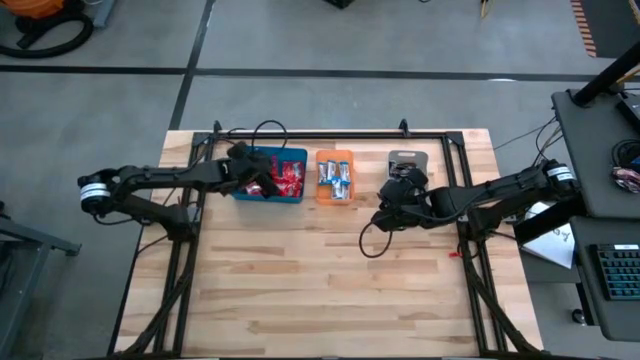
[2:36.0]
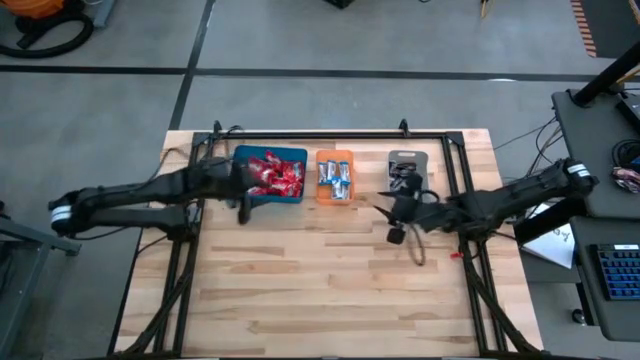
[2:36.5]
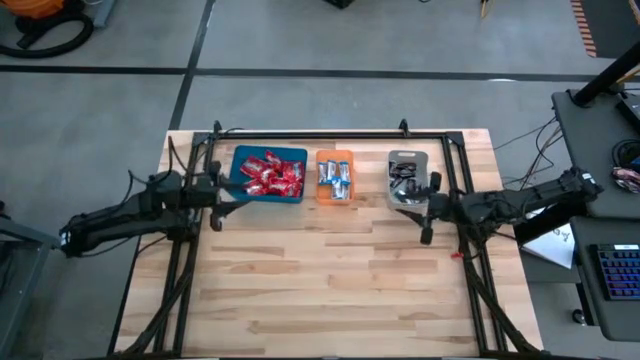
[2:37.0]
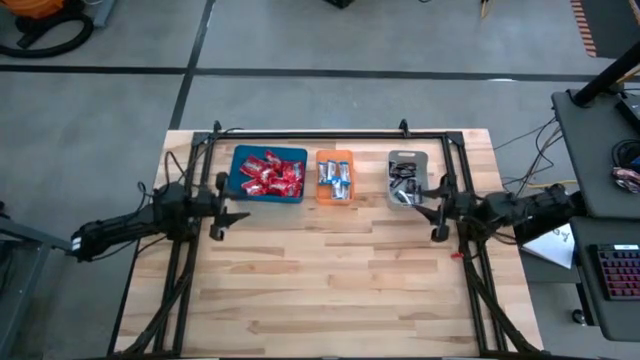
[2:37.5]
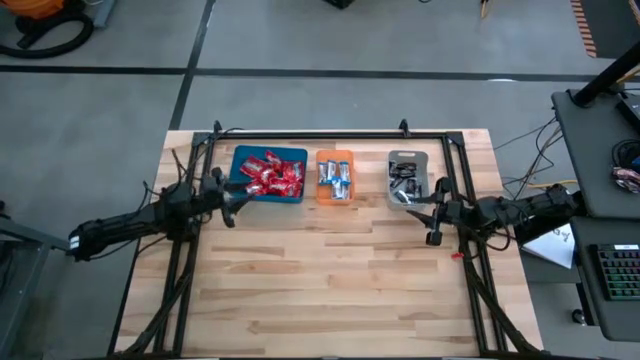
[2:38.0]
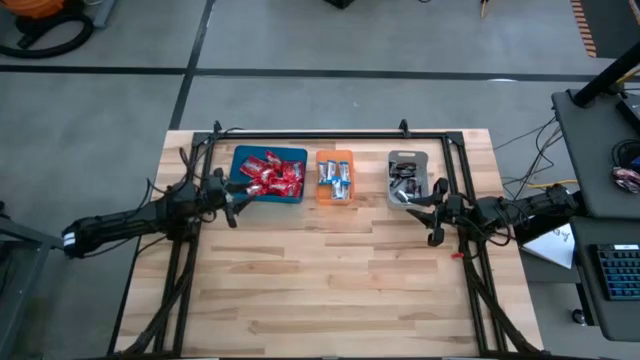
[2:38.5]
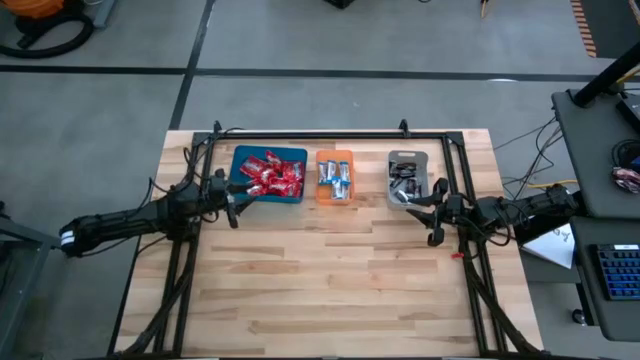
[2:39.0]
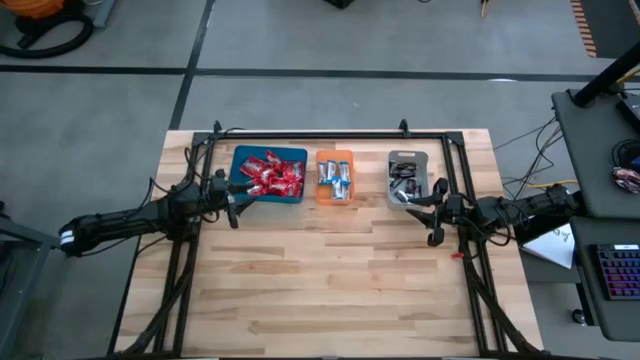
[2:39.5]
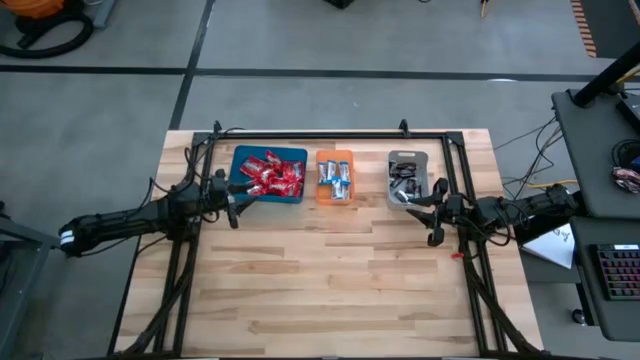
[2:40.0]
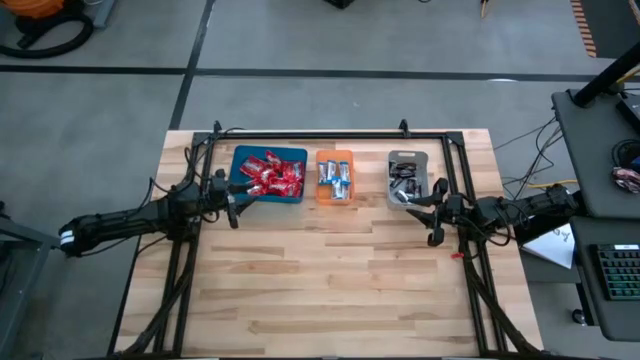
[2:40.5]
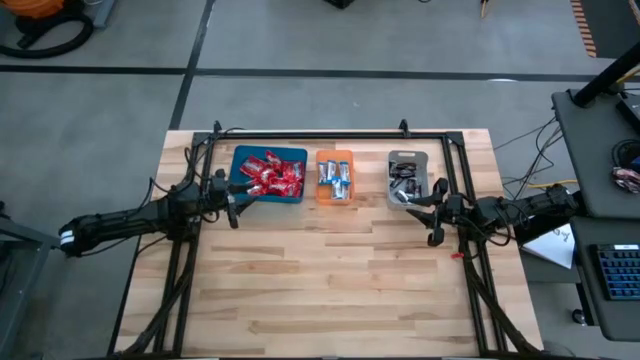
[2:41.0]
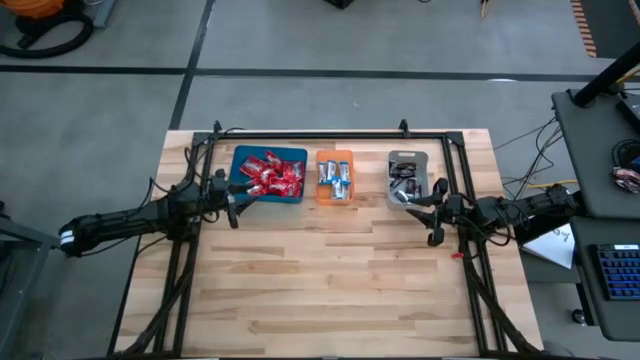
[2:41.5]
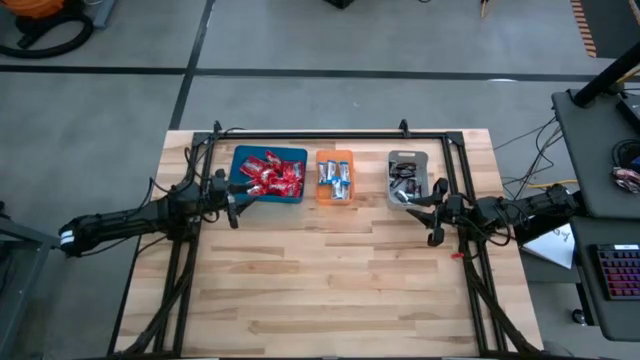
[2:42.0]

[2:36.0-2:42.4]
Task: Sort candy
Return to Home Position

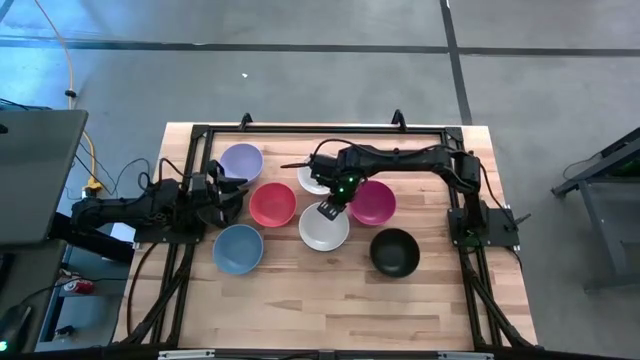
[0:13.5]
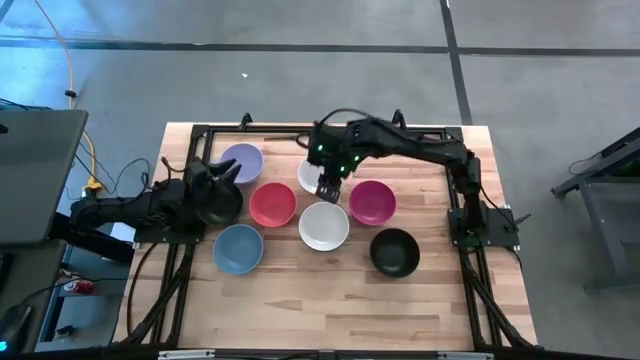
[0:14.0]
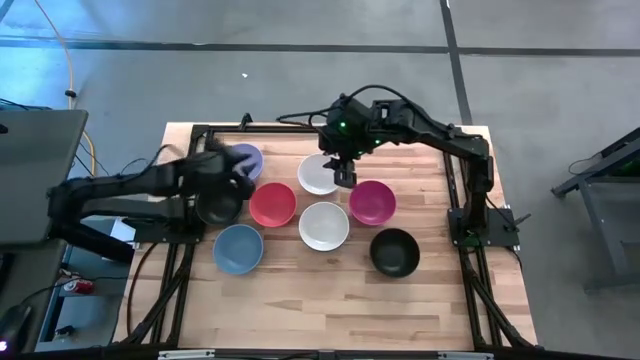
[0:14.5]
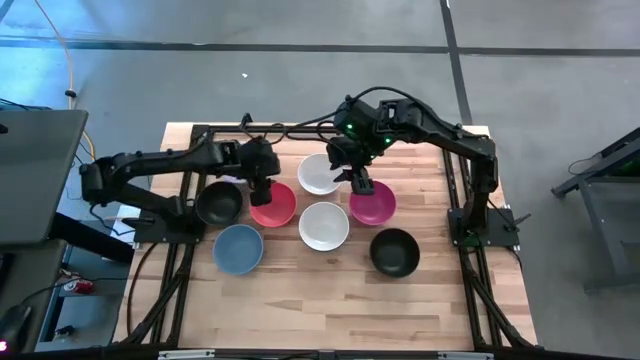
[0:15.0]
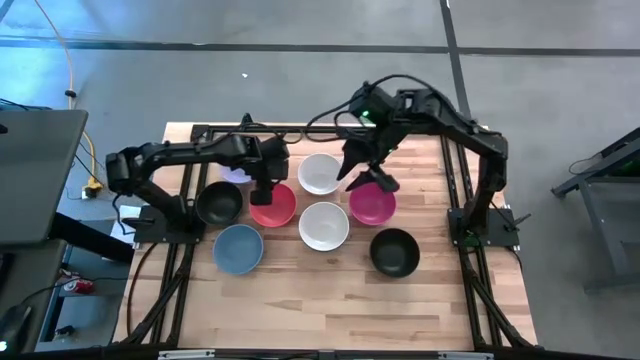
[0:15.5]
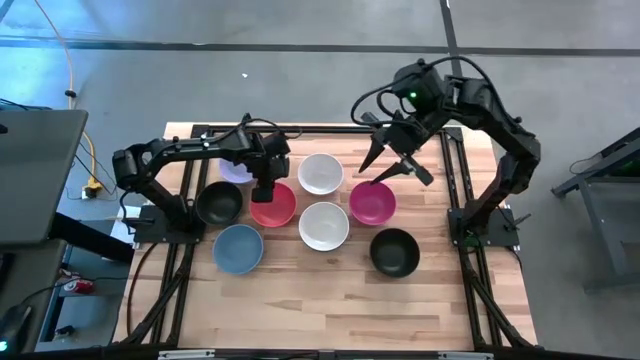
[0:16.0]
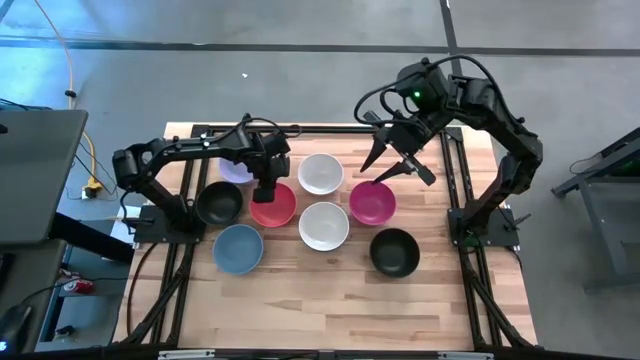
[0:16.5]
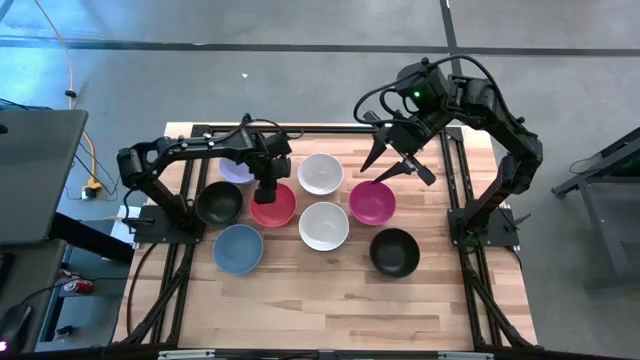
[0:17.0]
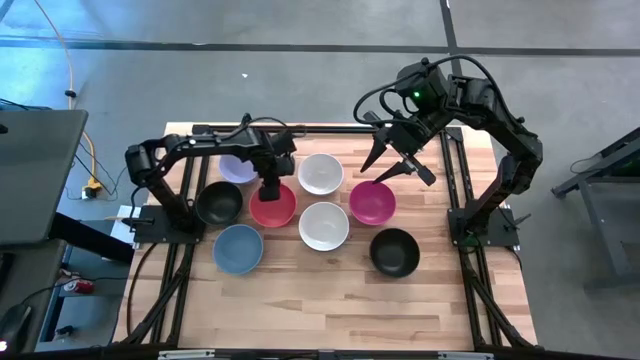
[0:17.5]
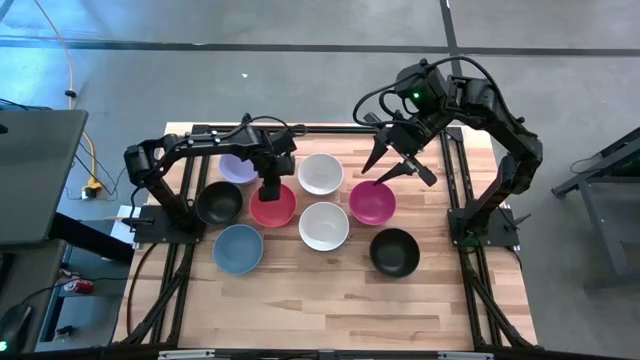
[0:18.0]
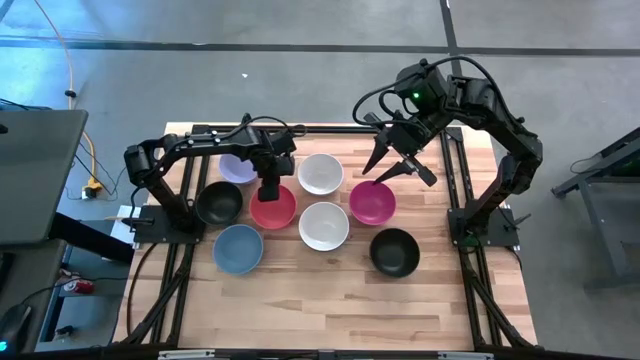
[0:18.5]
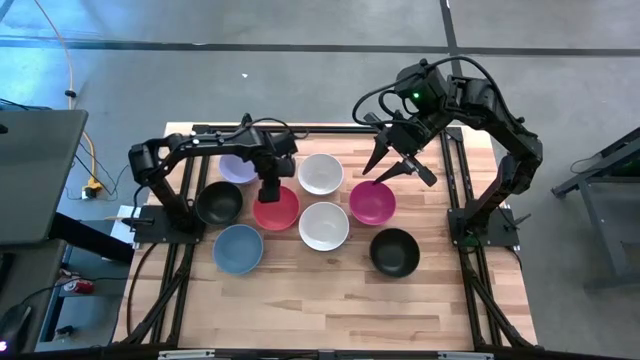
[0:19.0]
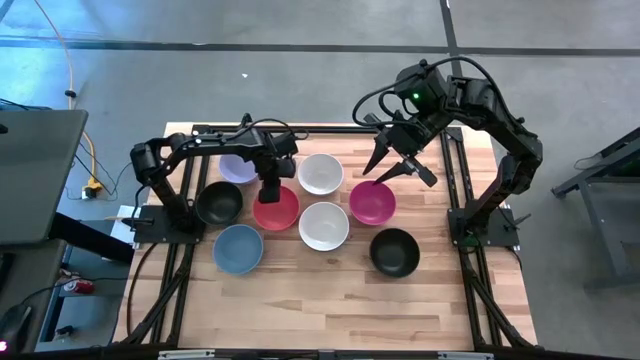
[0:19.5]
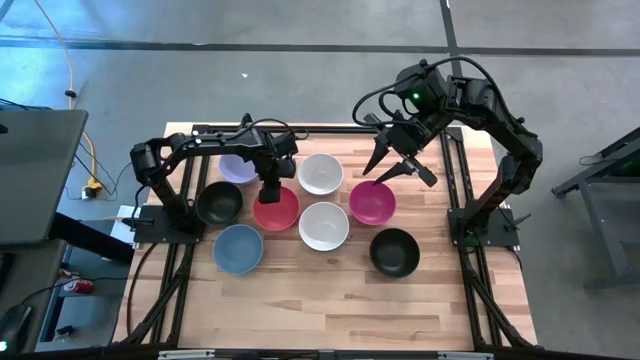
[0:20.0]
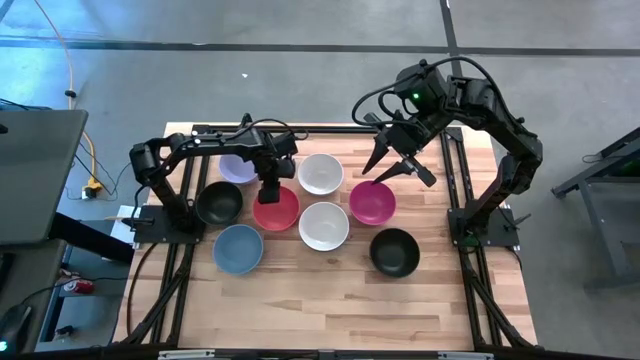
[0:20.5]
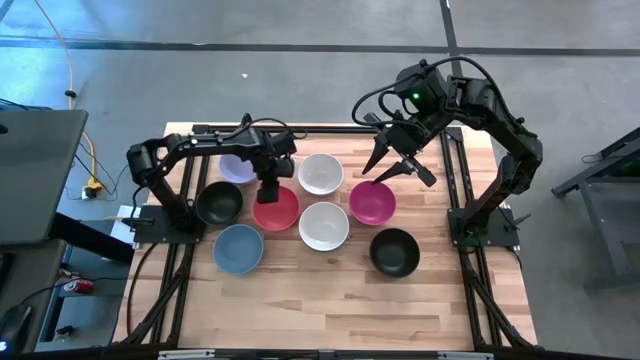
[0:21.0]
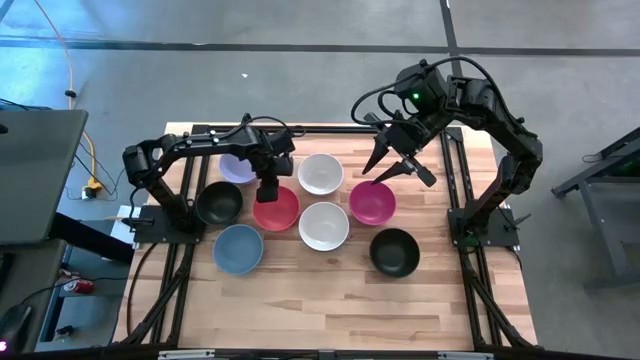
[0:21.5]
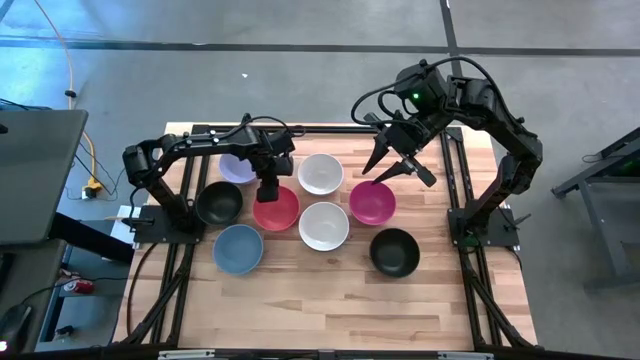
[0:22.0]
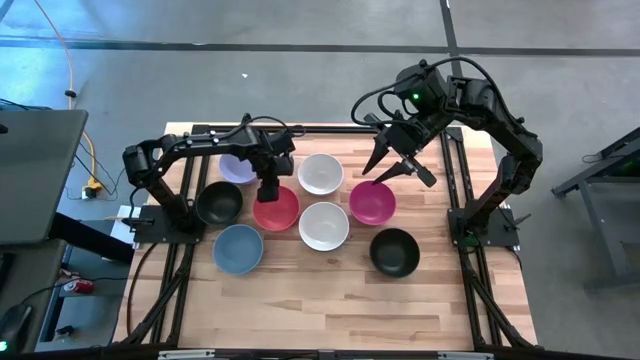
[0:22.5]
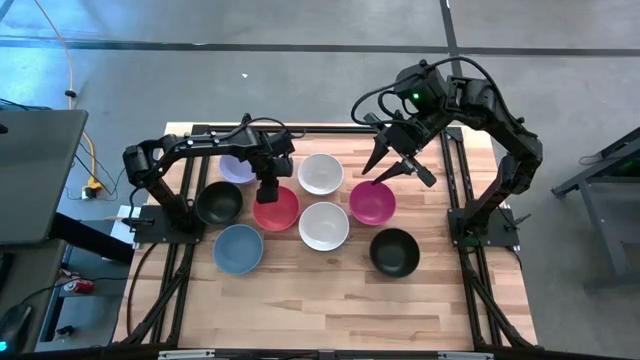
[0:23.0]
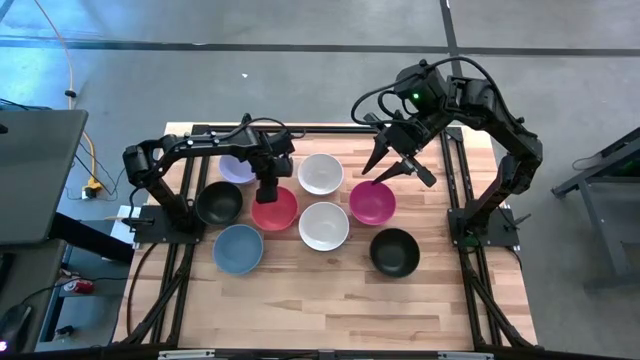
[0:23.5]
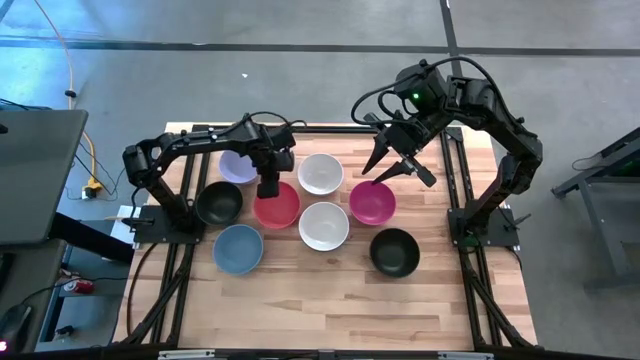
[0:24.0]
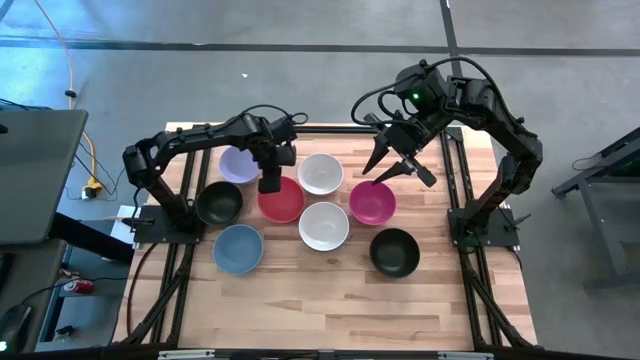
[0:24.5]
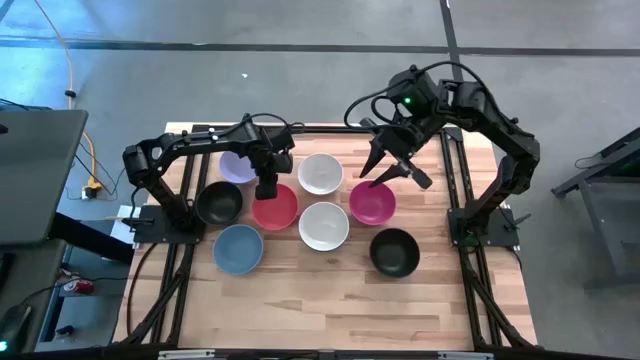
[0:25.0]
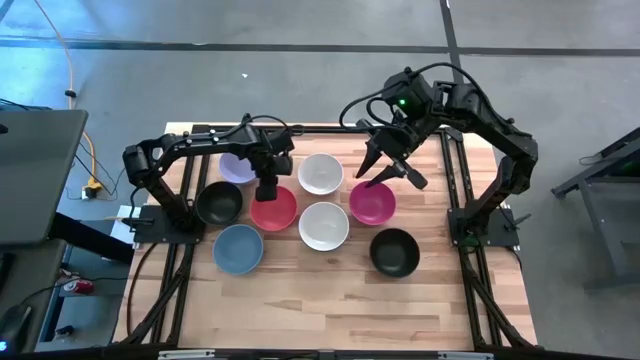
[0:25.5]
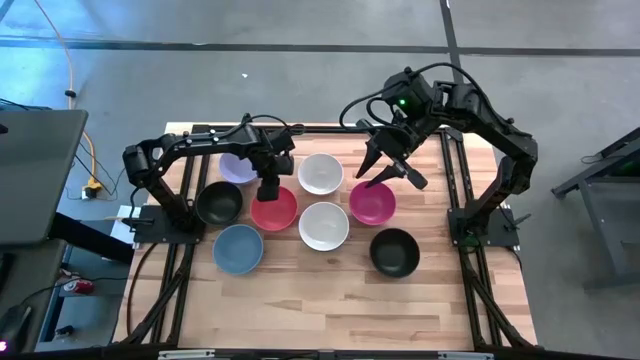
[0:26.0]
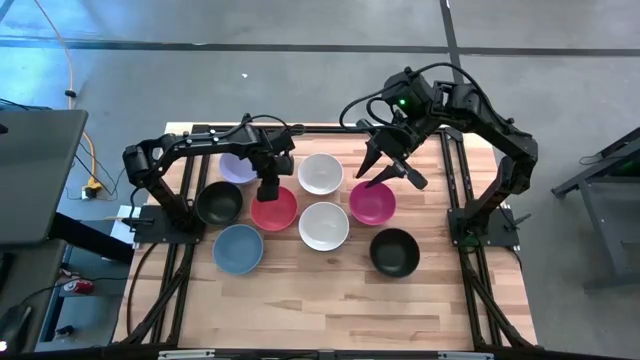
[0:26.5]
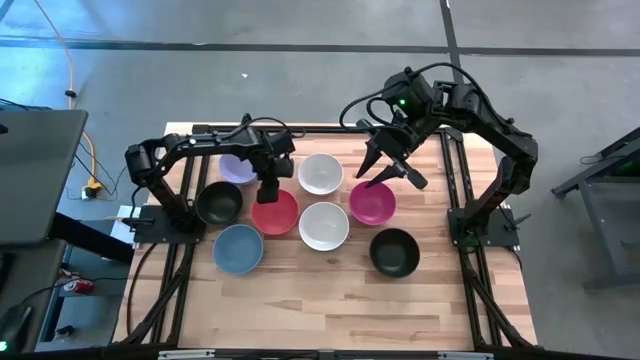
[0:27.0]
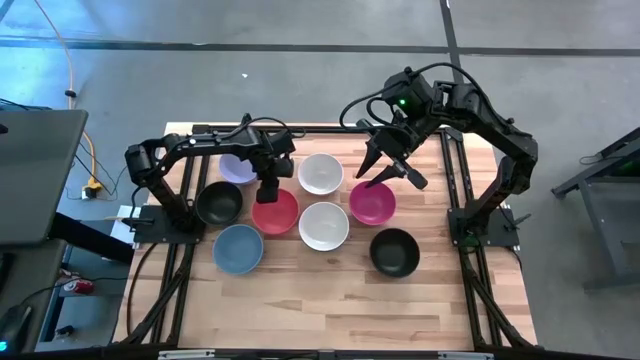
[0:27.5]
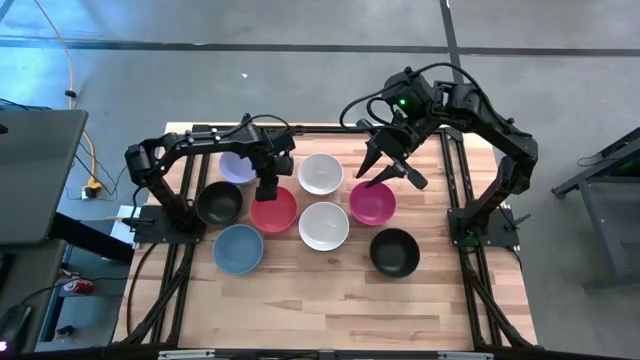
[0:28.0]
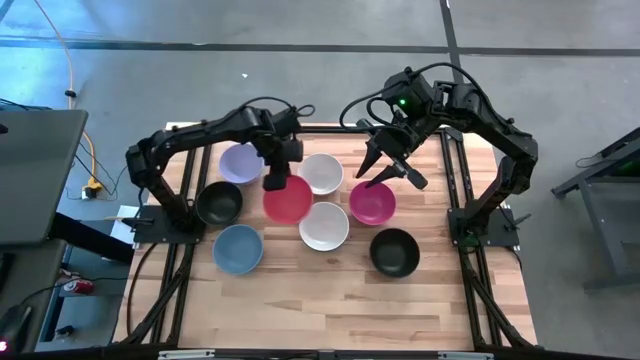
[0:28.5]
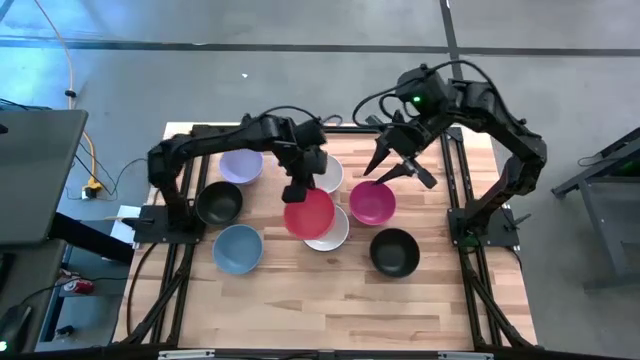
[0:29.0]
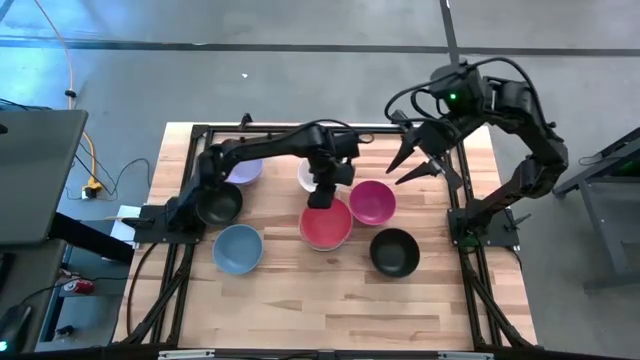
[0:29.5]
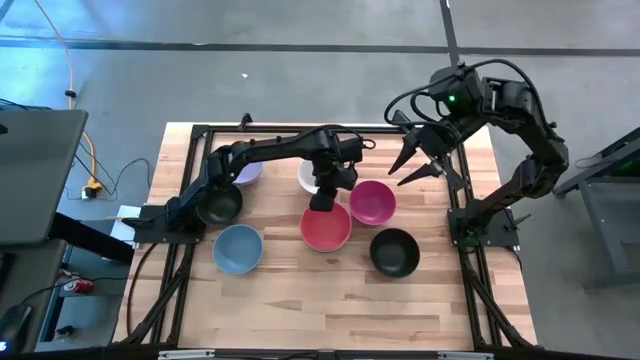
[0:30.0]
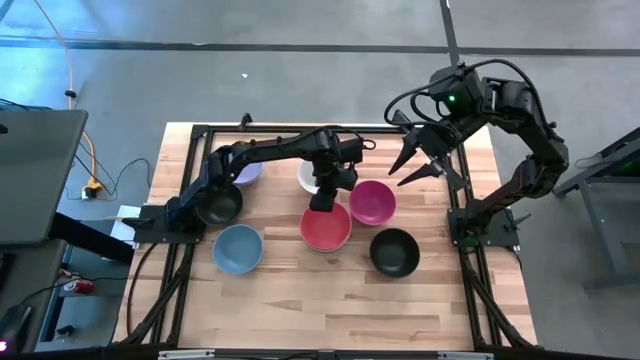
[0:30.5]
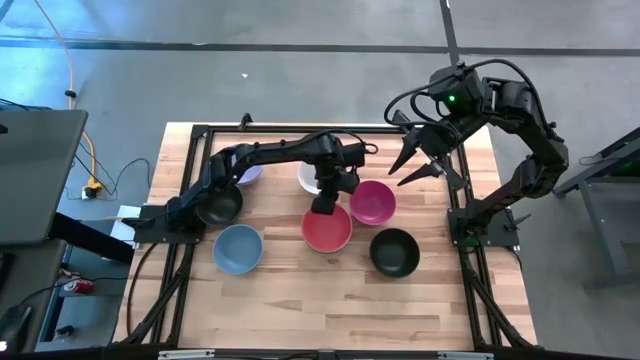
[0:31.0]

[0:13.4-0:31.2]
Task: Nest bowls inside each other
Stack the orange bowl on top of the bottom white bowl
